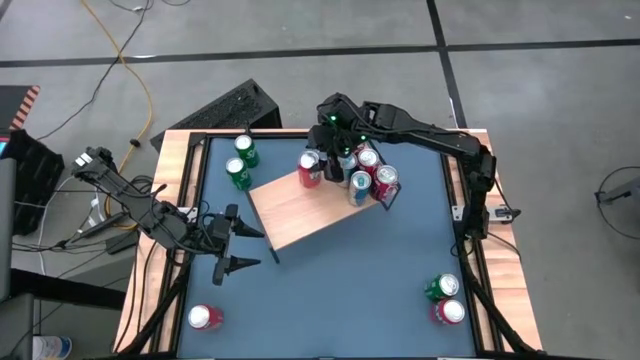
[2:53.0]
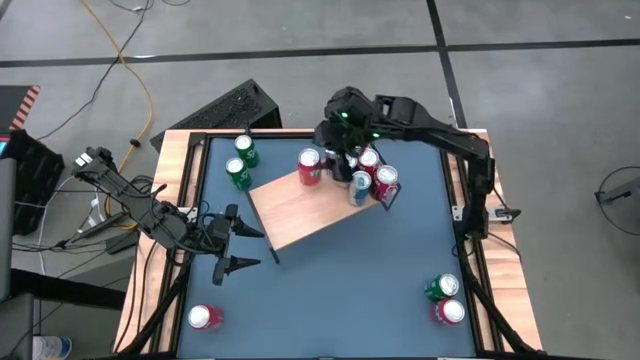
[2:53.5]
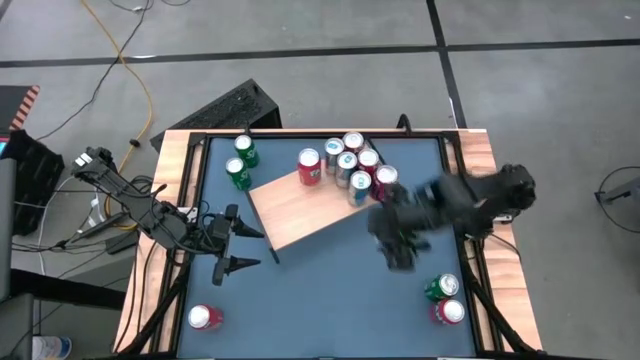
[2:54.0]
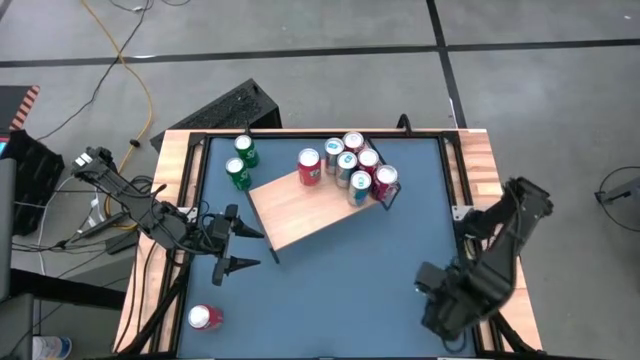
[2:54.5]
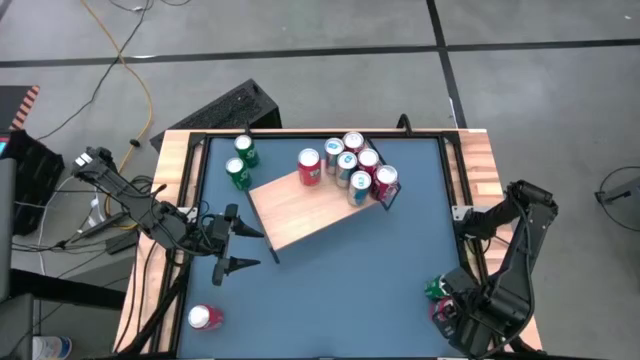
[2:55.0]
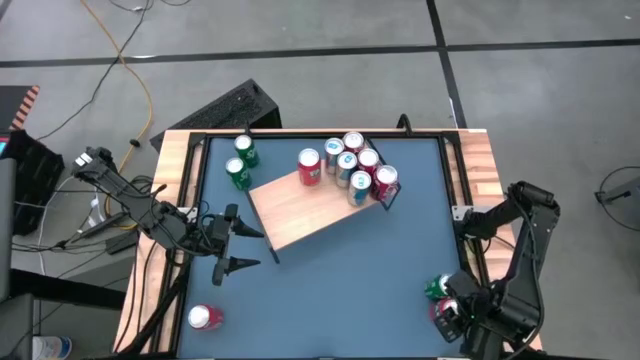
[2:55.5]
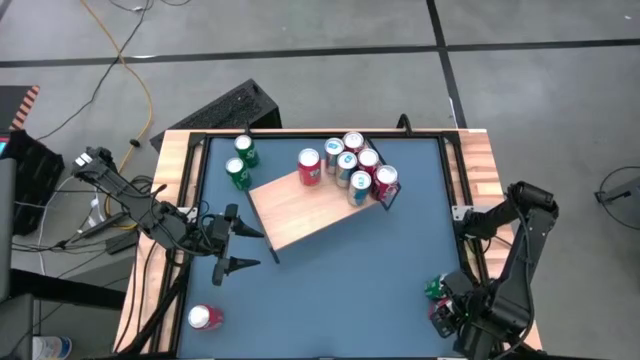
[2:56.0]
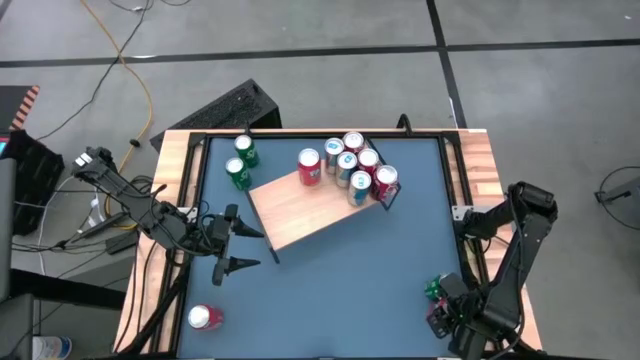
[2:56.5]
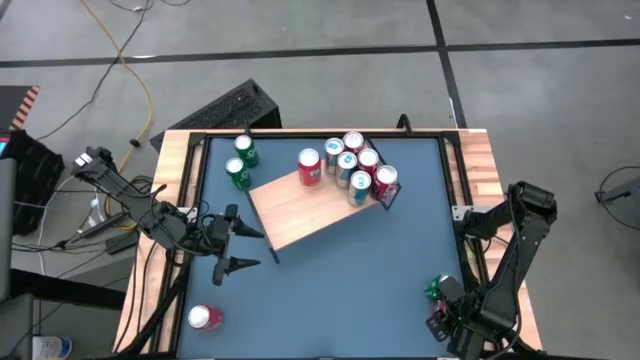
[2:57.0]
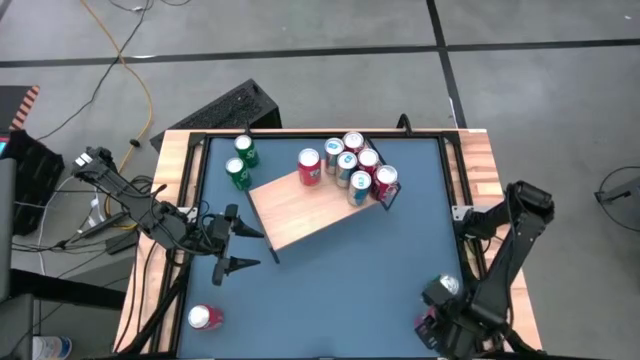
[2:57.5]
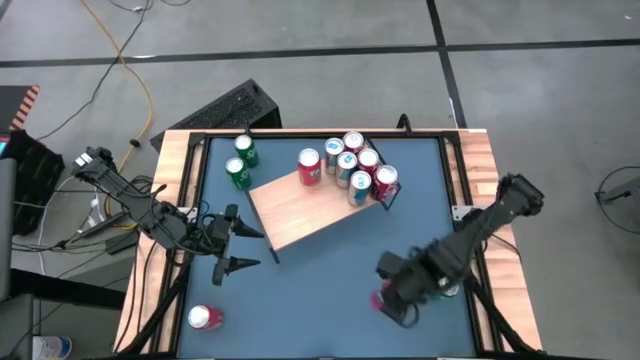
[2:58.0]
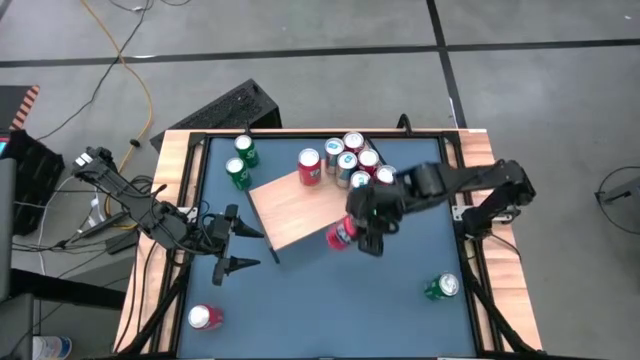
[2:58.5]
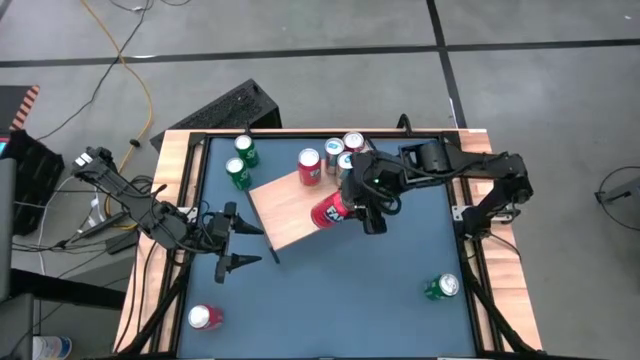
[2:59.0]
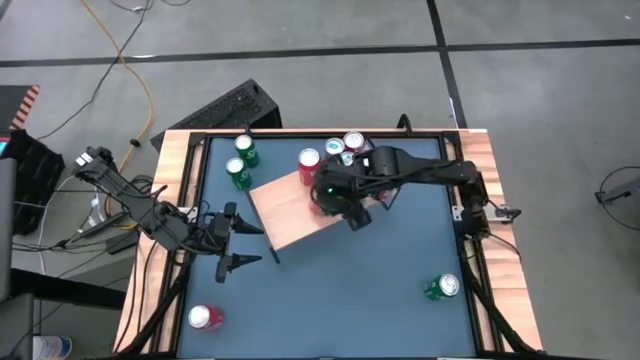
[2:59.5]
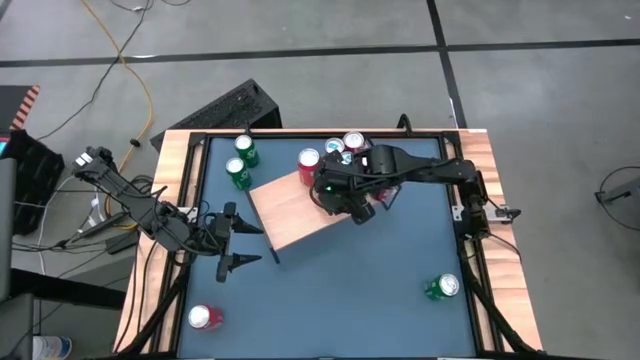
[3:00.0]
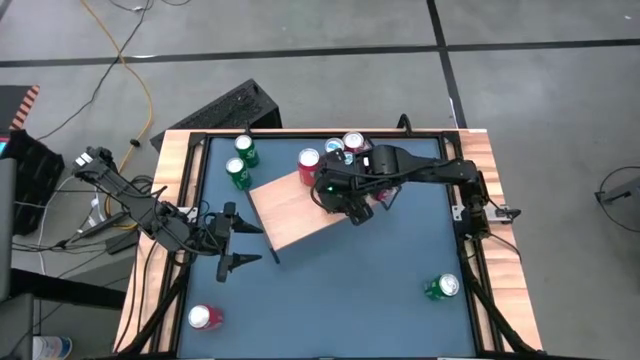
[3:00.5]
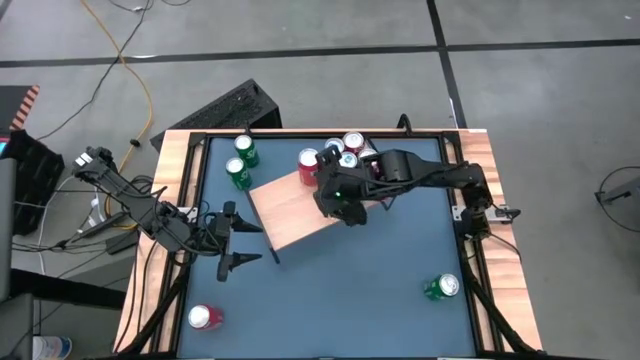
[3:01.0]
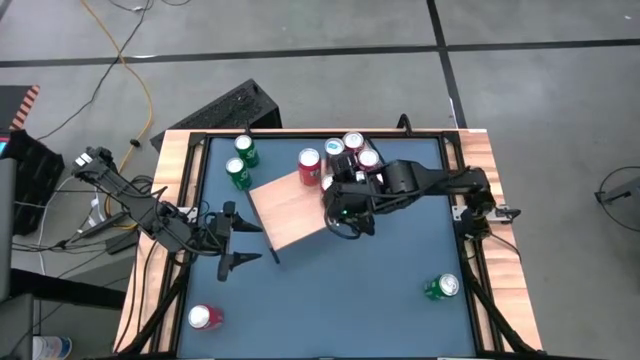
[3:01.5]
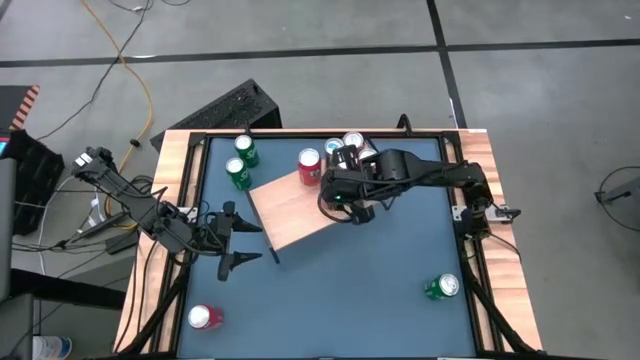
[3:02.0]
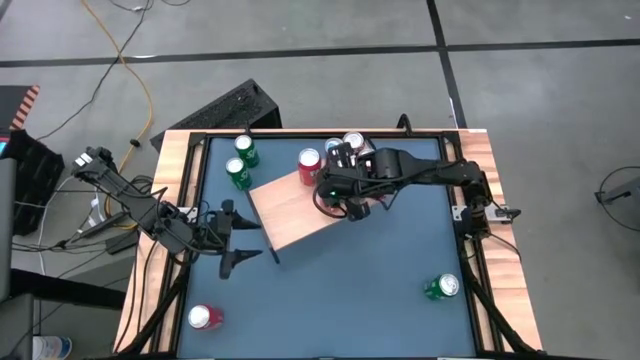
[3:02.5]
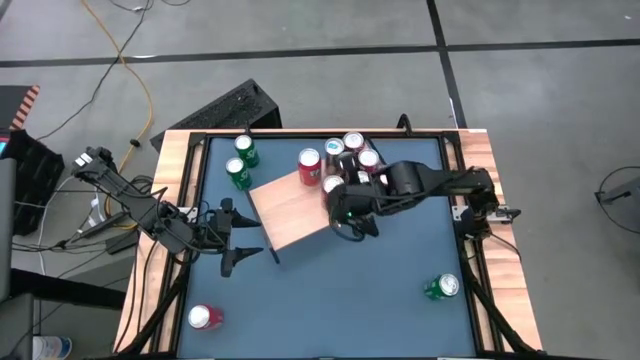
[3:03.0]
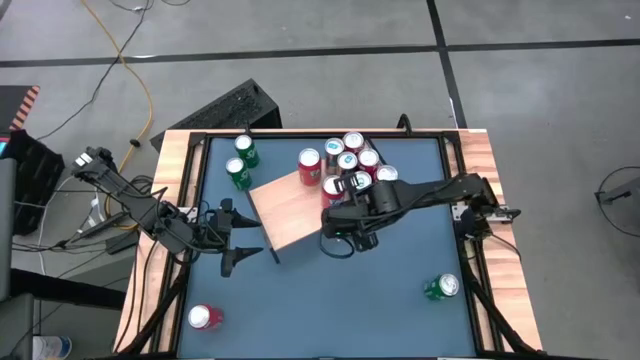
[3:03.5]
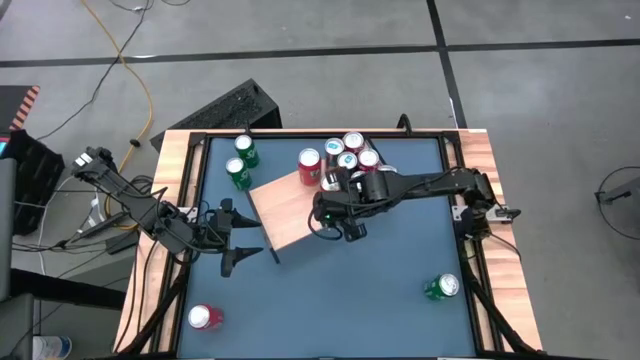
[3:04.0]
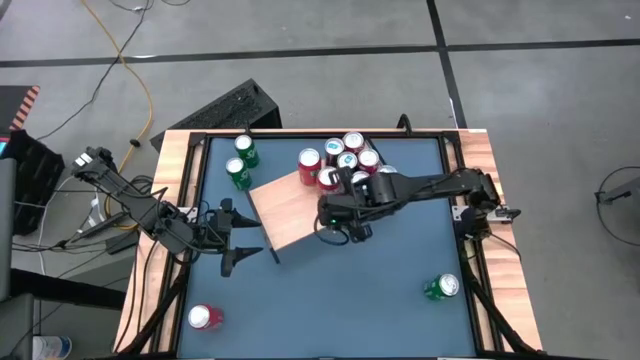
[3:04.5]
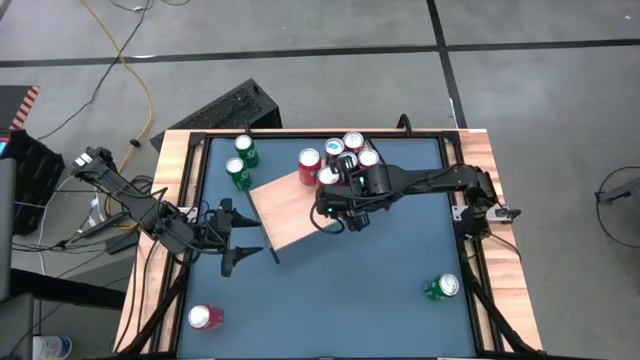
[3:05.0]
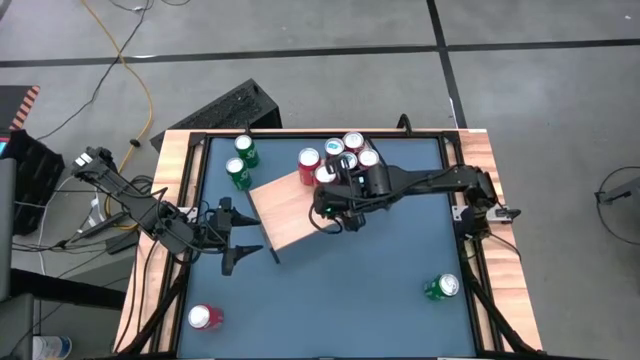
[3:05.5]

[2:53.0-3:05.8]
Task: Place canned beverage on shelf
Put the right red soda can on the shelf aligned with the other red soda can

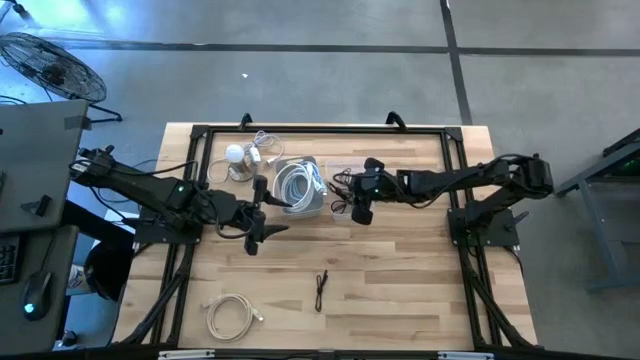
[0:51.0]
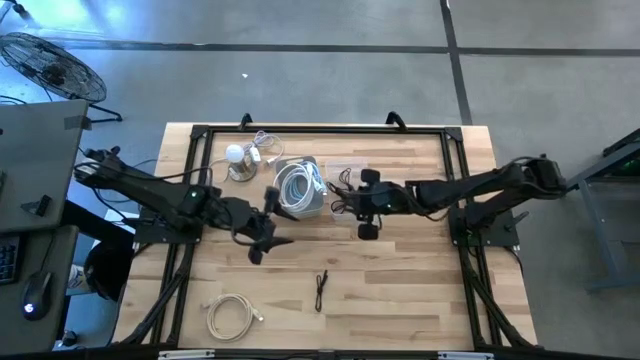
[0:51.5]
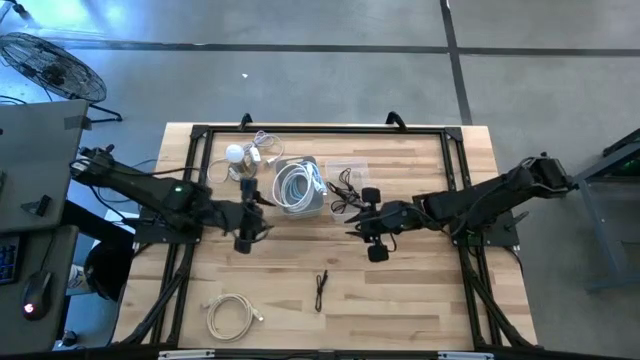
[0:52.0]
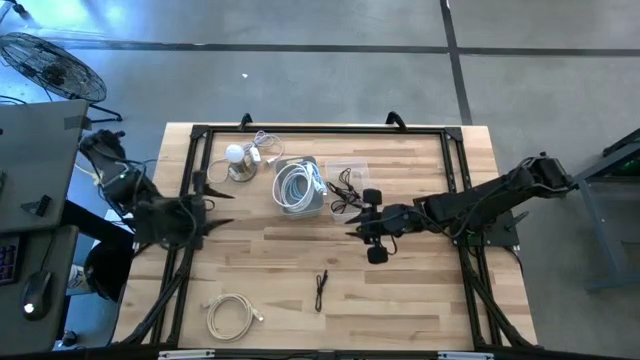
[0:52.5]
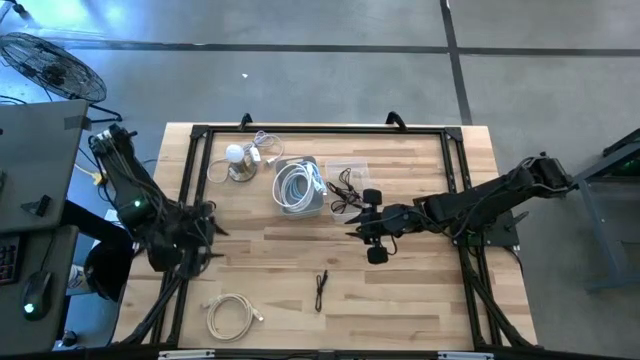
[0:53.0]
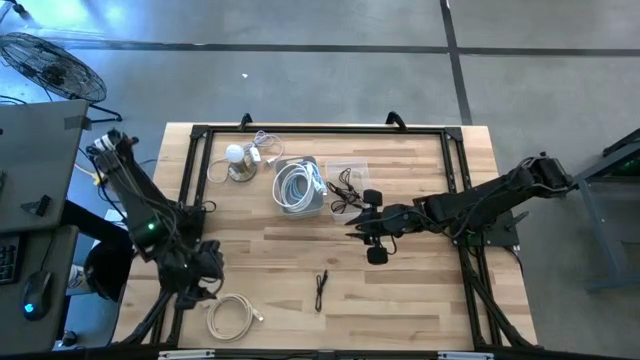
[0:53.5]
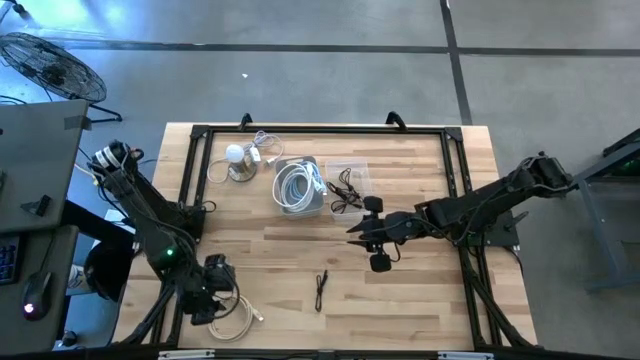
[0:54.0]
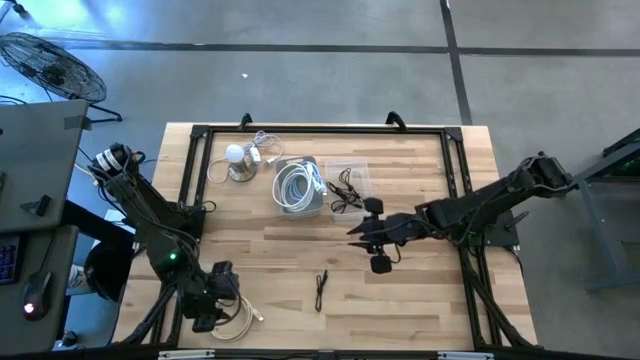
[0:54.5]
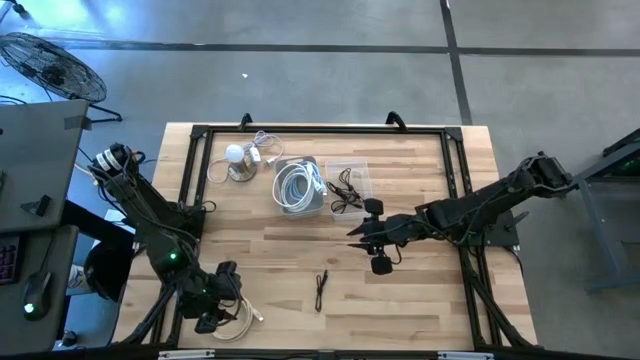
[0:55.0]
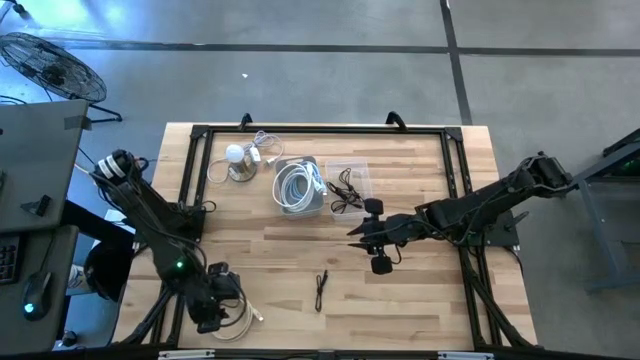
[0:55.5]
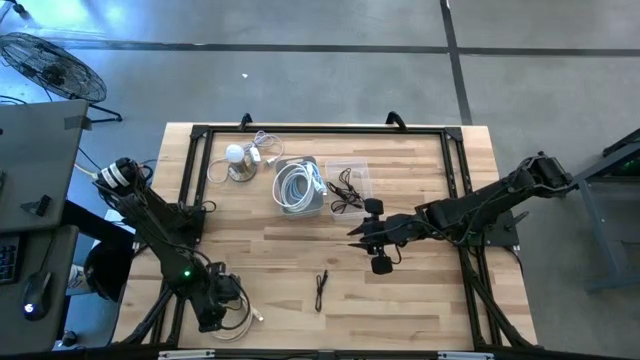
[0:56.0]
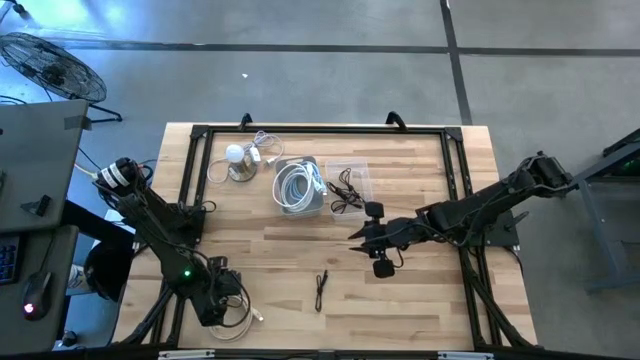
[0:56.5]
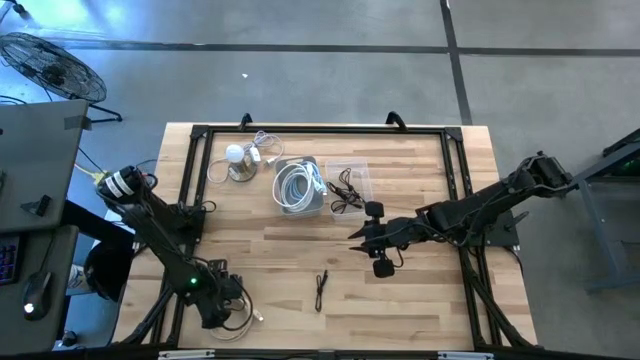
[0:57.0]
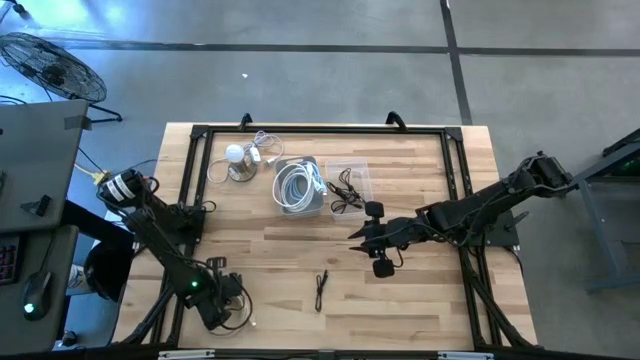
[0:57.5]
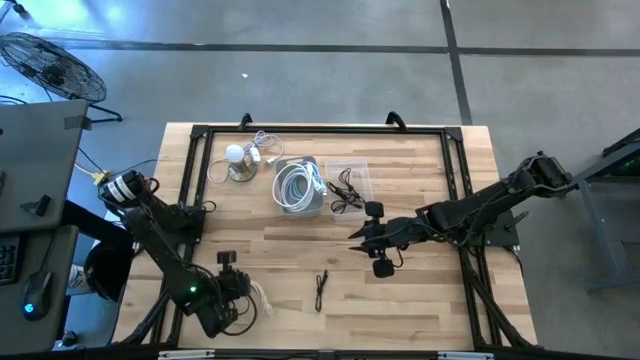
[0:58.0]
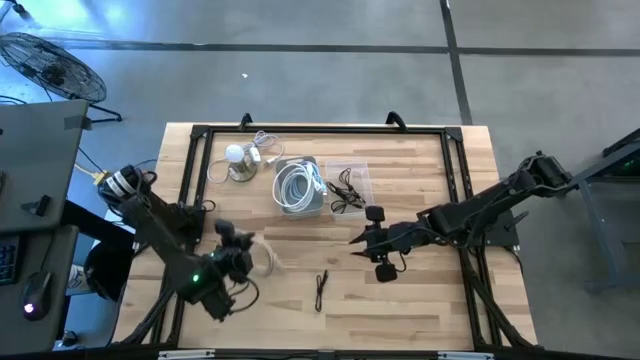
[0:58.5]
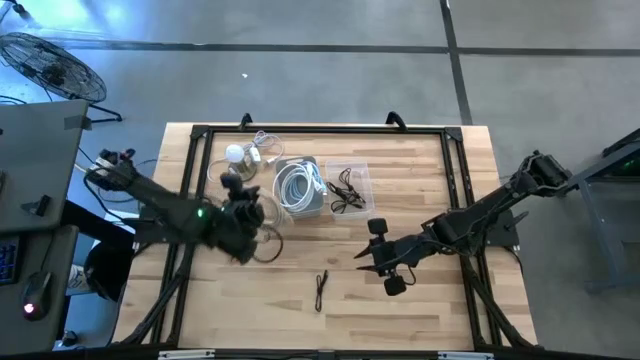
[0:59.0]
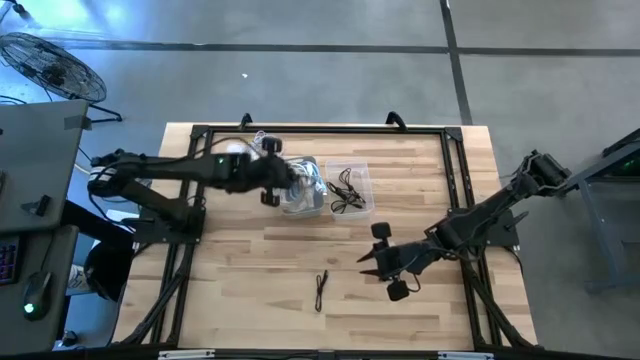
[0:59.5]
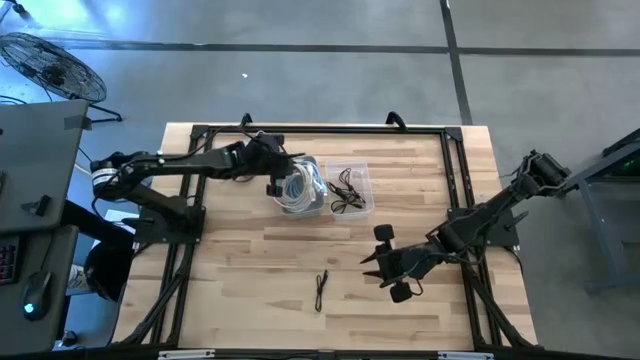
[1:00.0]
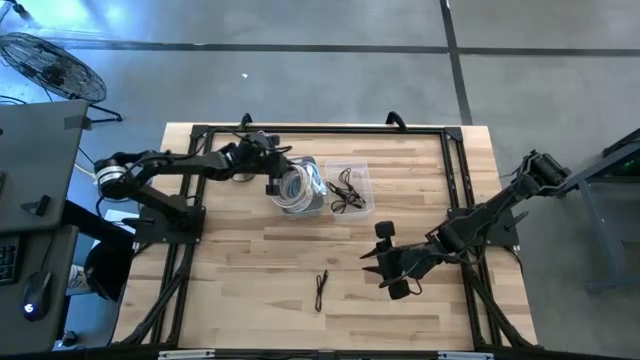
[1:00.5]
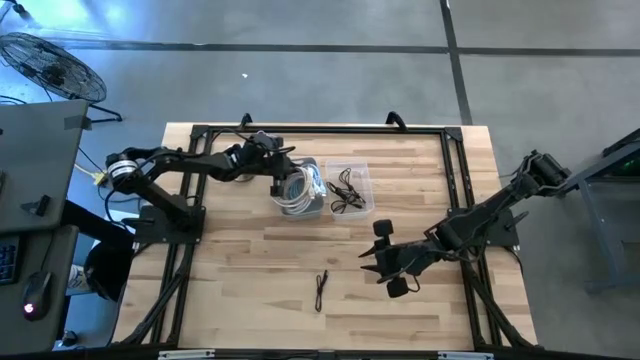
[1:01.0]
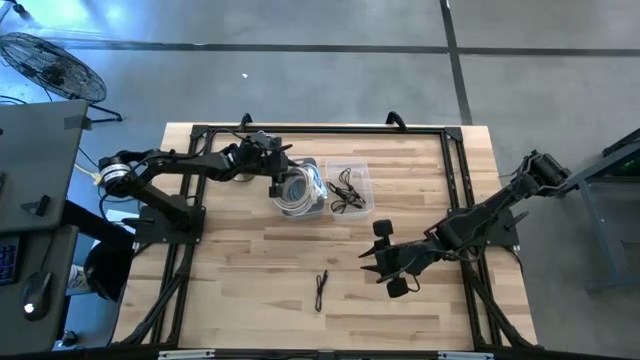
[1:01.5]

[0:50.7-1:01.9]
Task: Pick & Place USB Port
Put the brown HDMI cable into the gray bin
